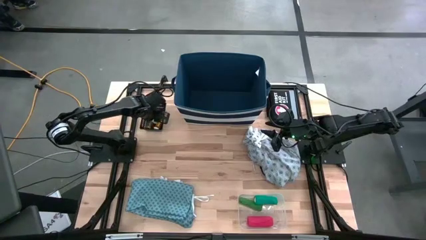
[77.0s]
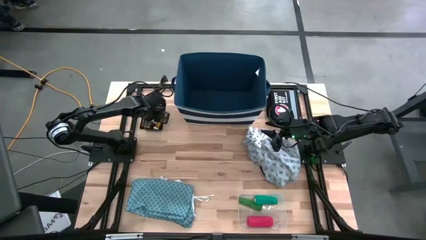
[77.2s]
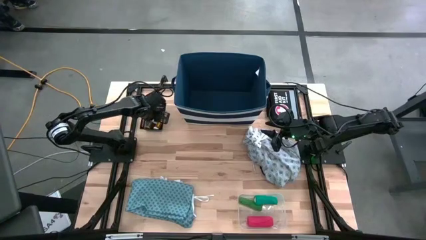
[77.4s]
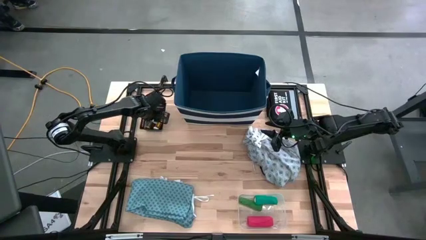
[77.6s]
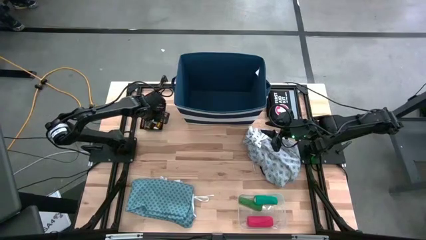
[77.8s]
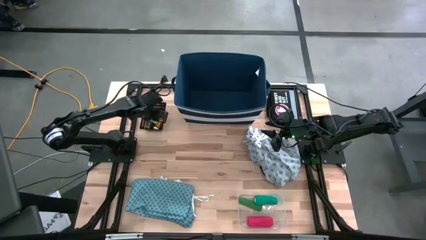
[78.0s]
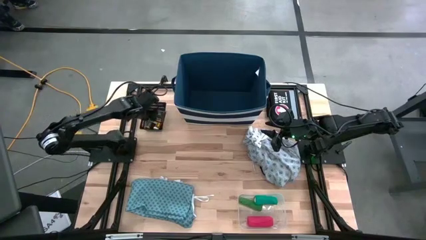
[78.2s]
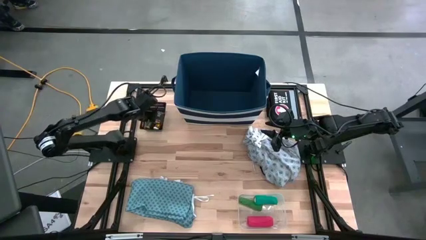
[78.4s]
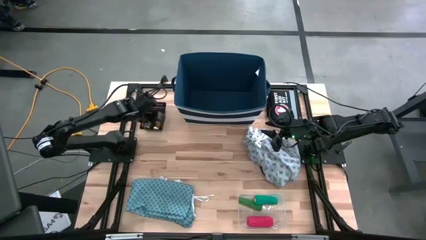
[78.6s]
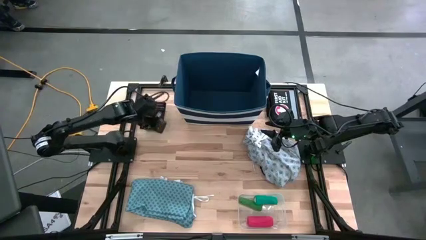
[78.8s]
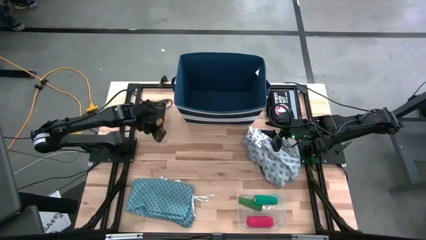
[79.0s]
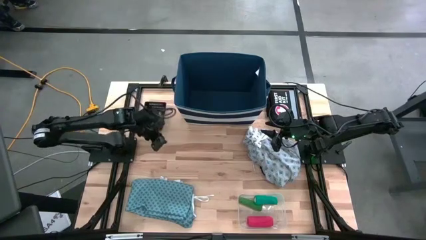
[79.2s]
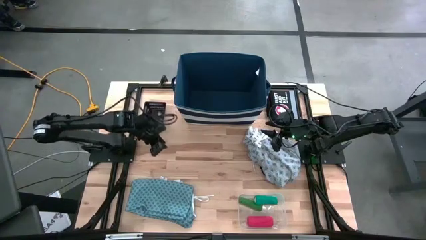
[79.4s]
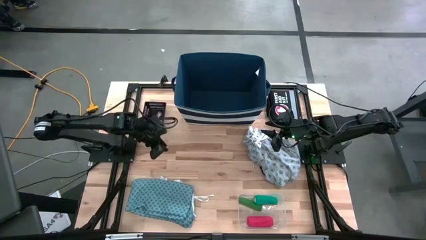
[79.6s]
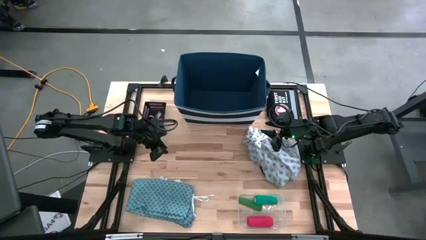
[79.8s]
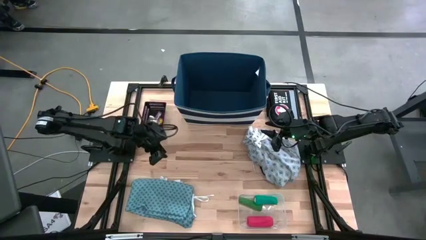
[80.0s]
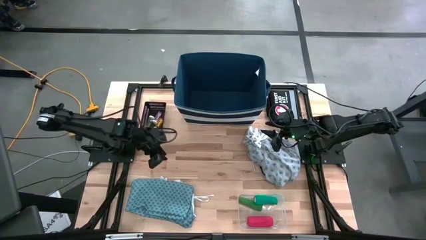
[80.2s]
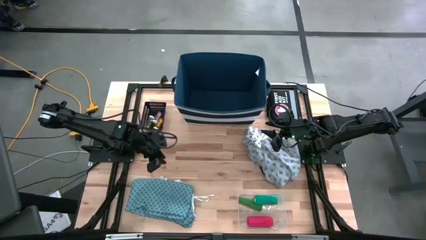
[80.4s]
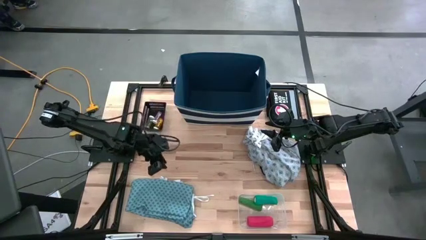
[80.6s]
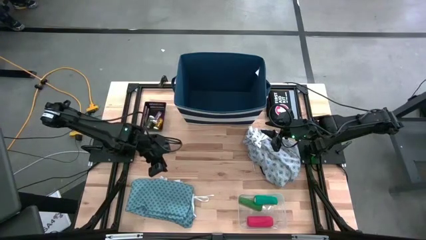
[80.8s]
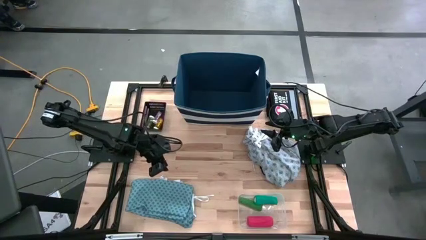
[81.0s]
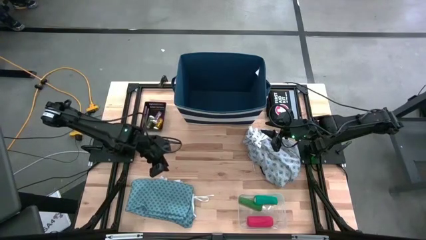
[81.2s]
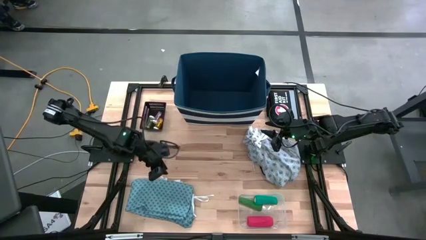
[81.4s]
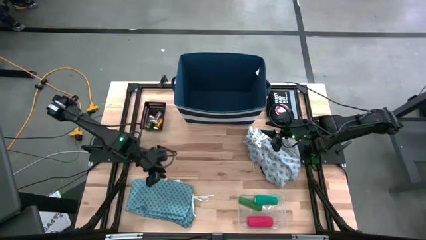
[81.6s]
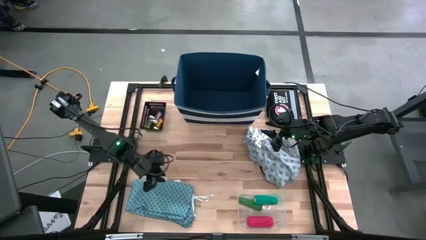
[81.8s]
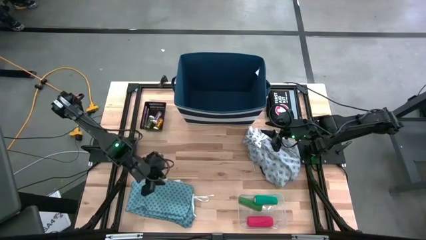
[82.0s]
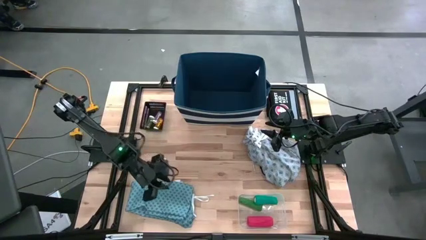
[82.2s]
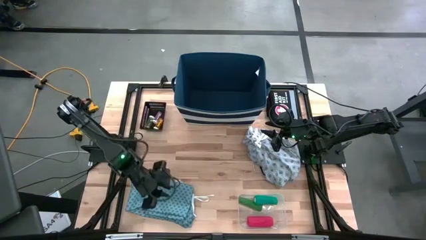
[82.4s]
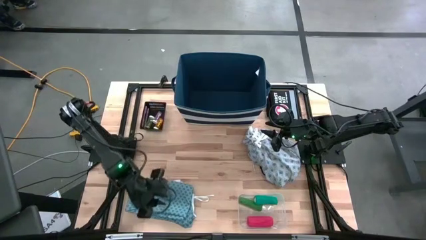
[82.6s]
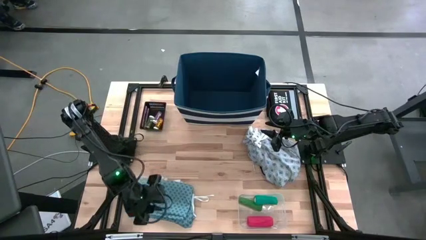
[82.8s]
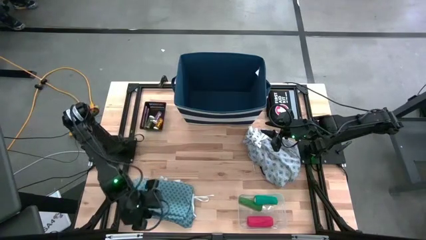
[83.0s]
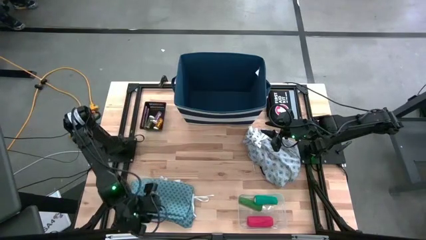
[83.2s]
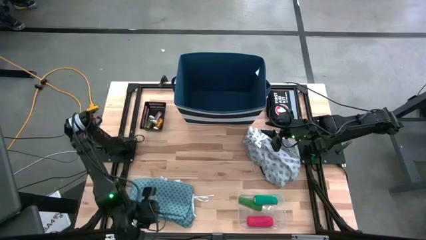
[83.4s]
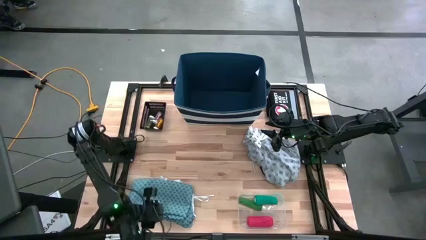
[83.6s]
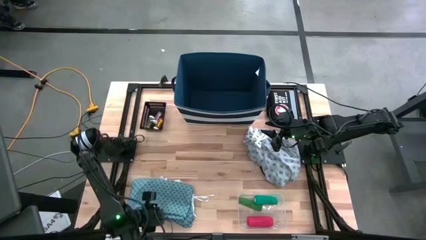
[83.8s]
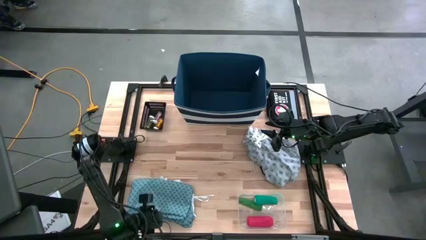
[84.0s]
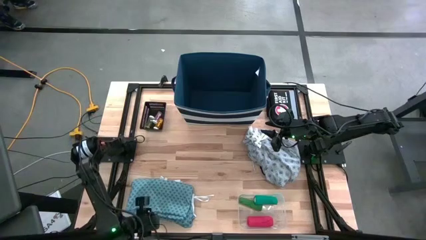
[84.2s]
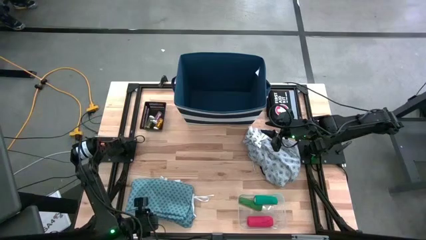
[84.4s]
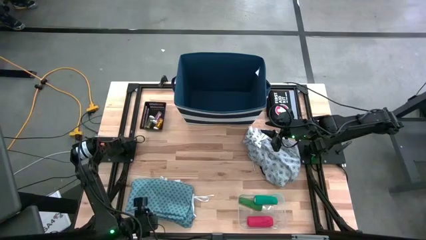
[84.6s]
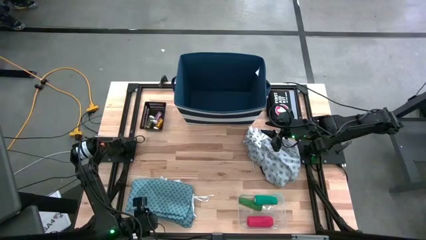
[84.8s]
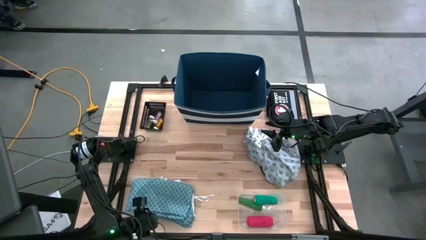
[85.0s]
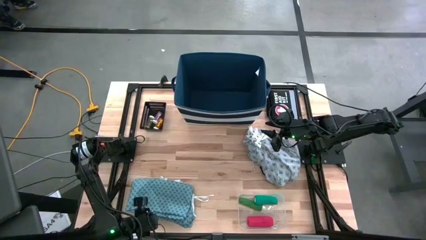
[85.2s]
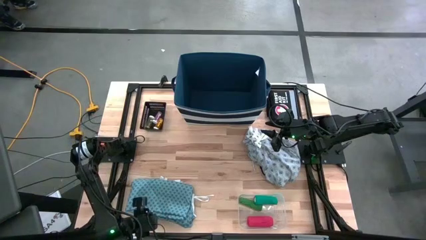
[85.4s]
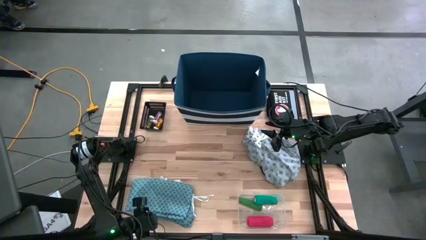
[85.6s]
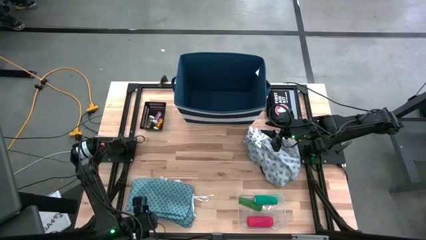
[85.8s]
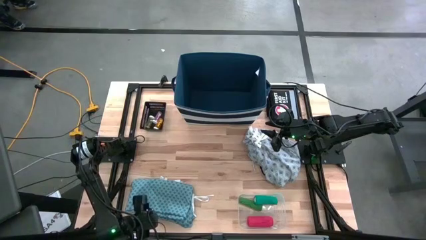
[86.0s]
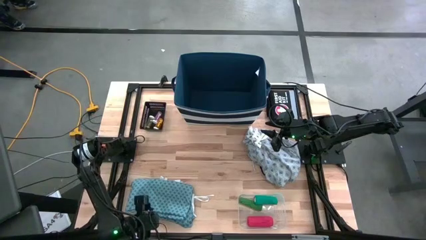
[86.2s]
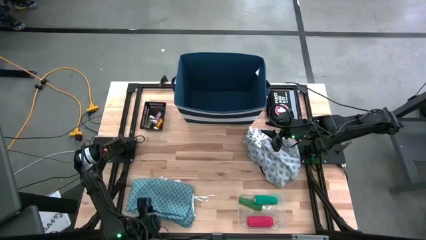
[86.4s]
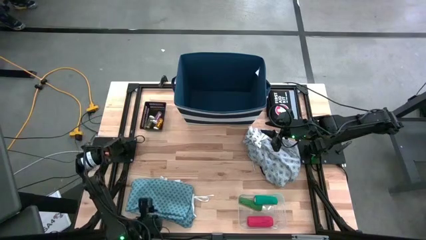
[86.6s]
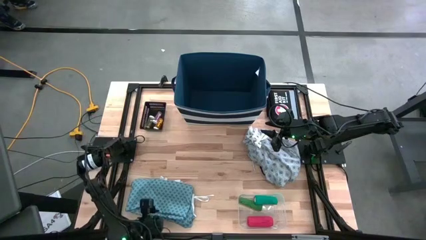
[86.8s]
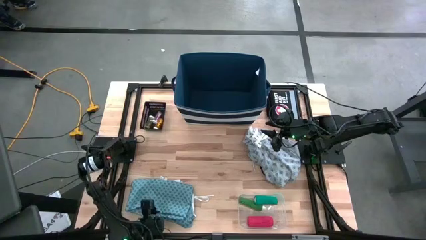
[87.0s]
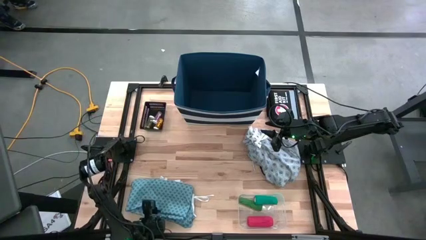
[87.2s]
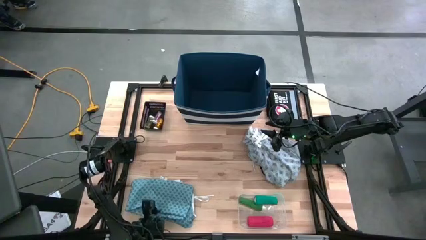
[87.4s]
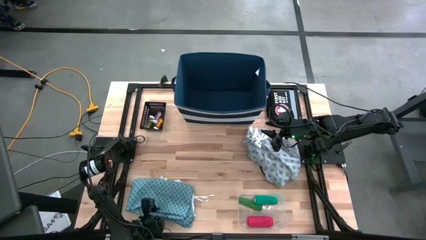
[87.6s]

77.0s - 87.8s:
Task: Pick & Place Medicine items
Put the light blue patient gown into the laundry bin

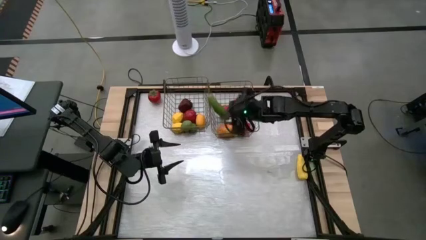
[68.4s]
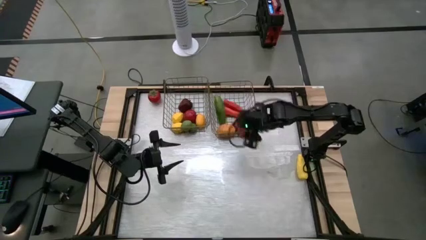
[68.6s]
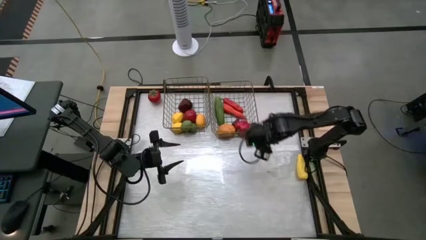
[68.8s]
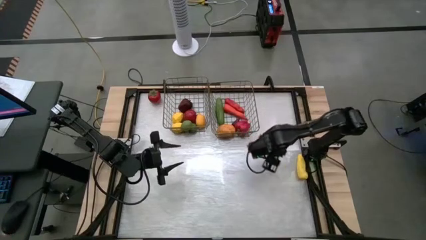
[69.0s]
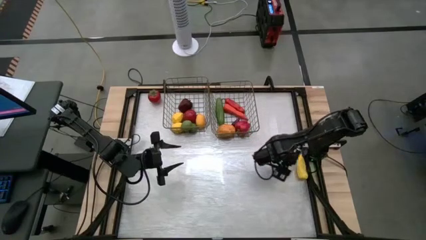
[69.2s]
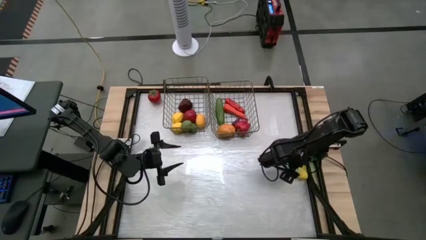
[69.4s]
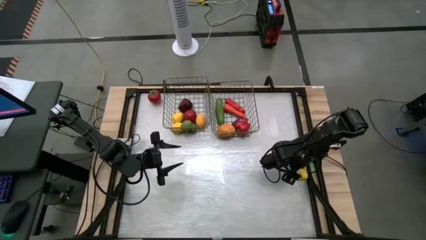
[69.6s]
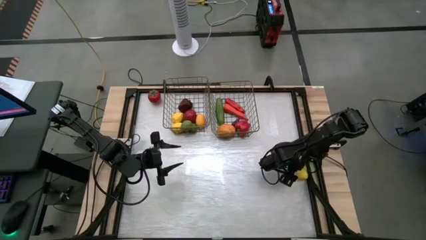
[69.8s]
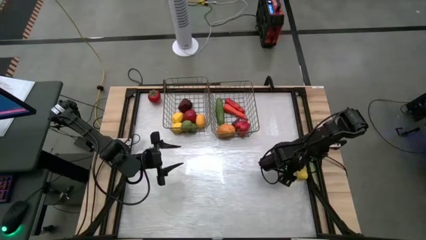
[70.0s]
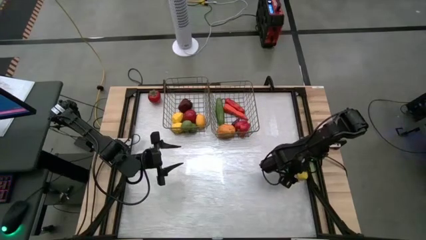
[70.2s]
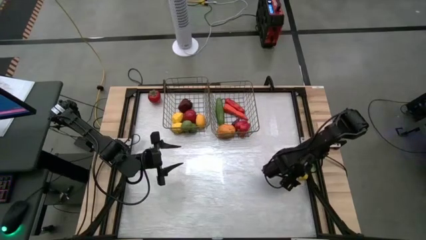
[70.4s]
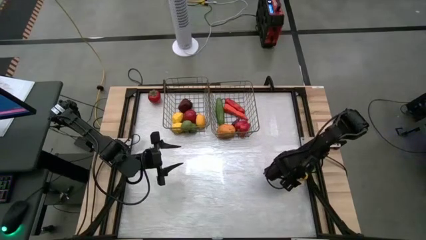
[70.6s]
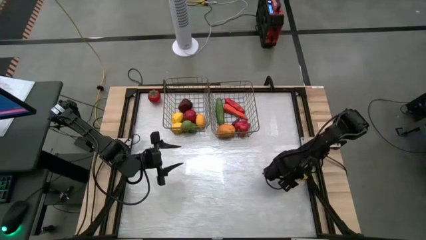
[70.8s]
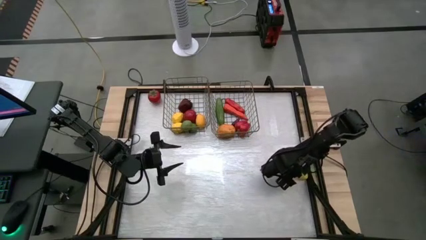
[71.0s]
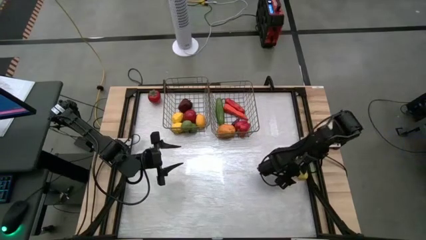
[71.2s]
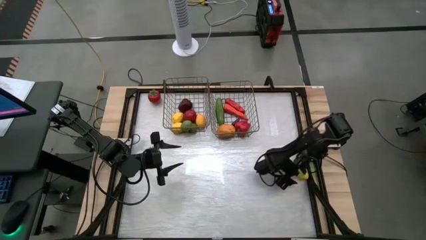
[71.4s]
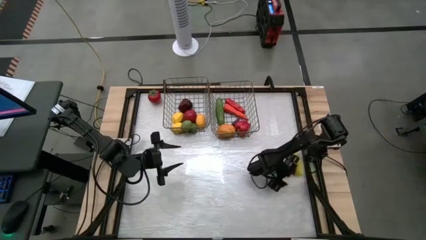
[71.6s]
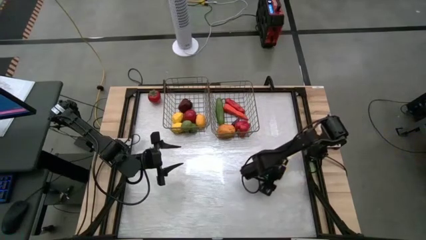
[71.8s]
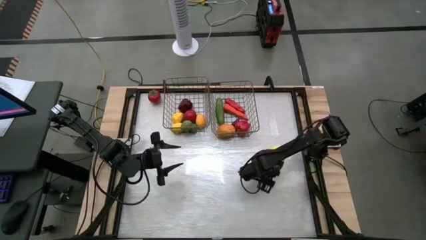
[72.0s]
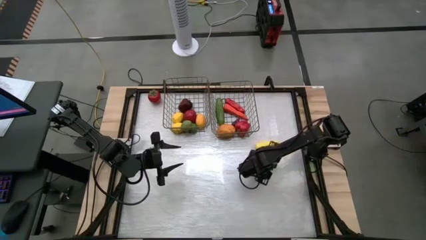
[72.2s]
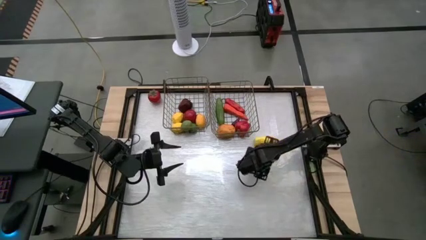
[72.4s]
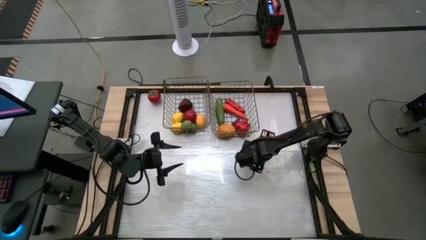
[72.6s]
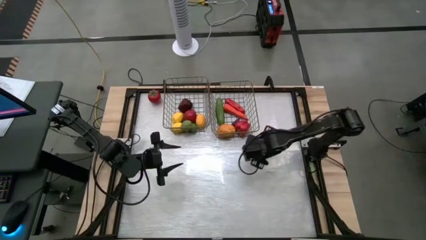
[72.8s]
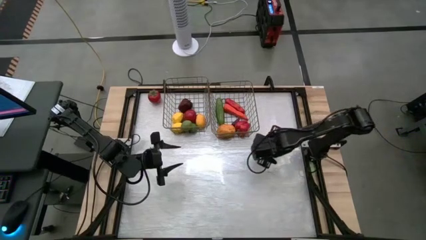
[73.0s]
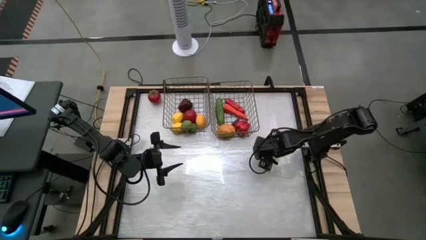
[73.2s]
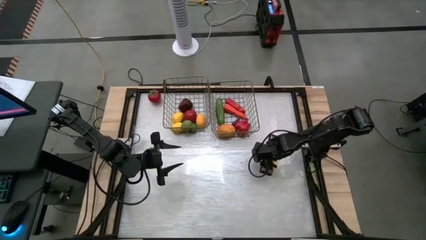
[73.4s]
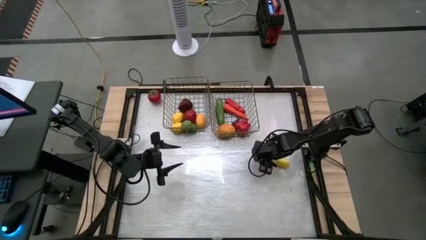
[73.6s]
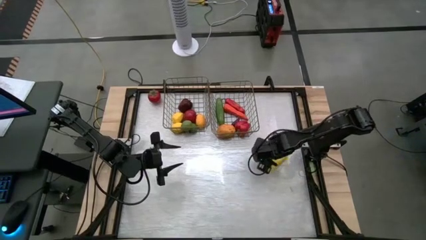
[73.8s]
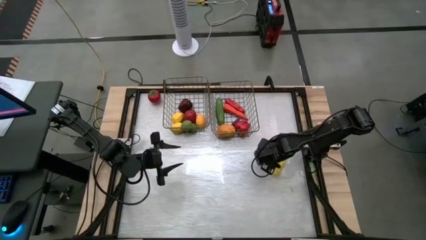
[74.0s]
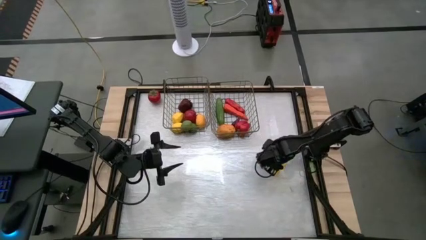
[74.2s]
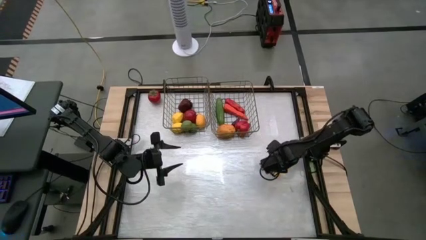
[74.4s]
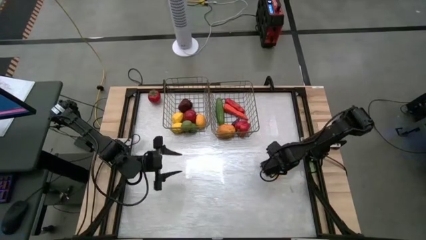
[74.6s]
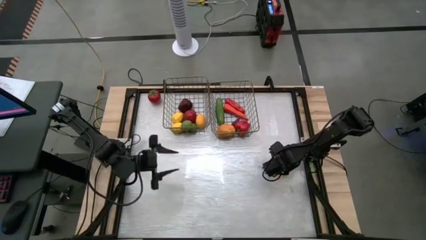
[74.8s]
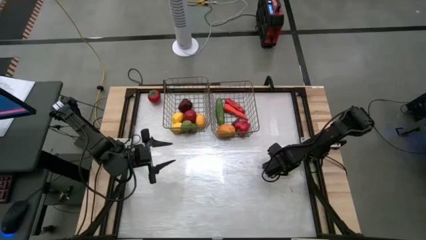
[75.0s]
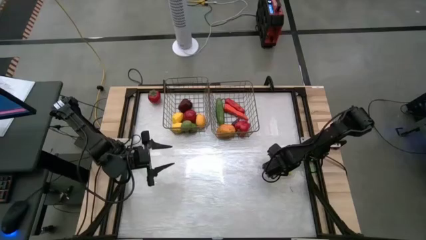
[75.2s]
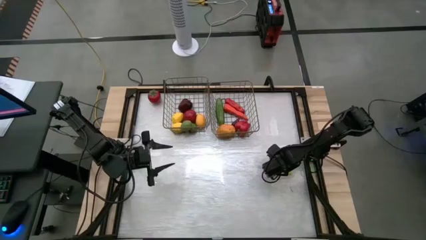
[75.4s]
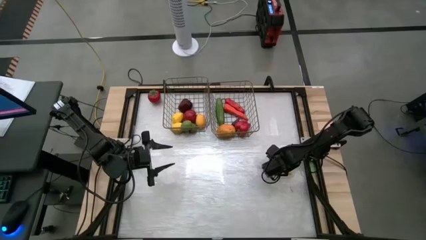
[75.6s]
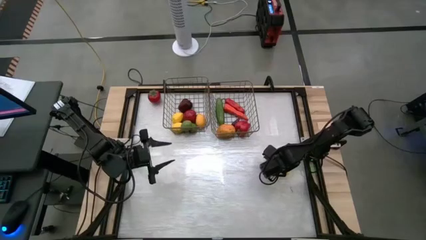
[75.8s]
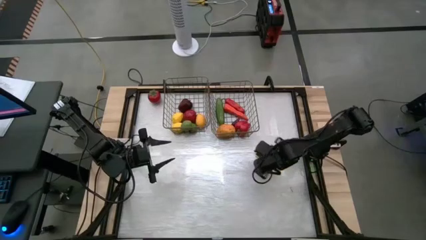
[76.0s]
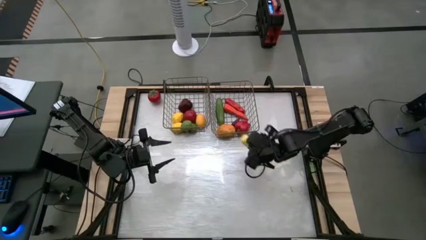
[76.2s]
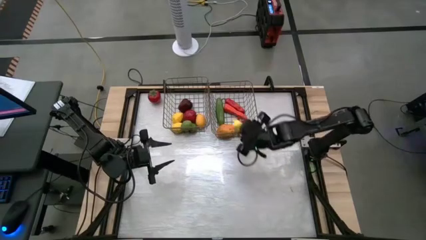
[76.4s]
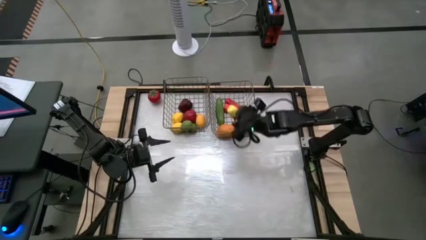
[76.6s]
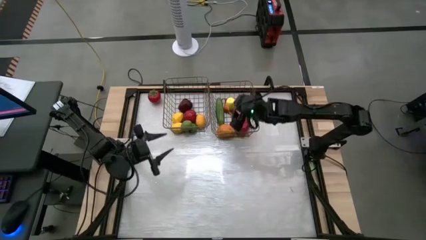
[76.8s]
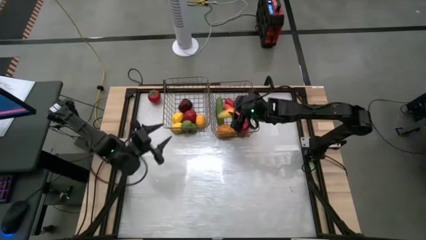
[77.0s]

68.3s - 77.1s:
Task: Sort produce into baskets
Put the corn into the right wire basket
